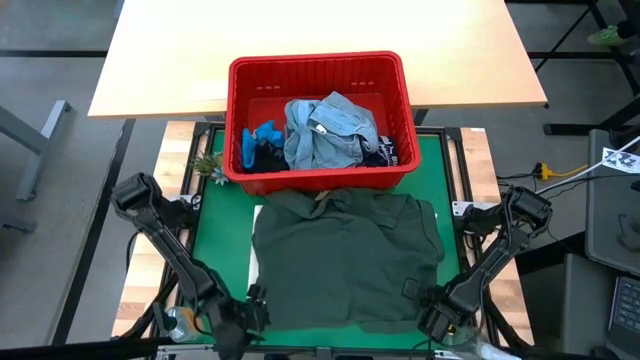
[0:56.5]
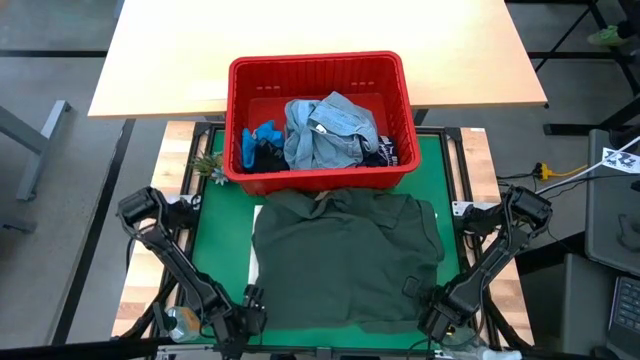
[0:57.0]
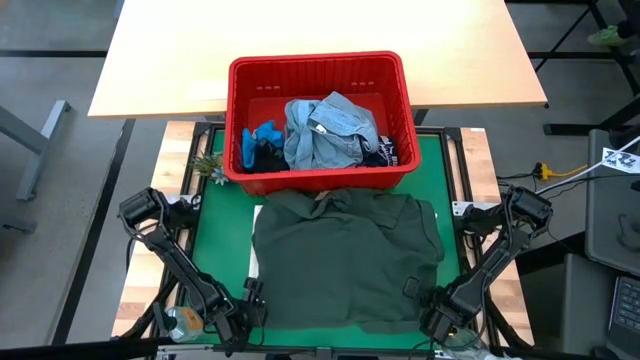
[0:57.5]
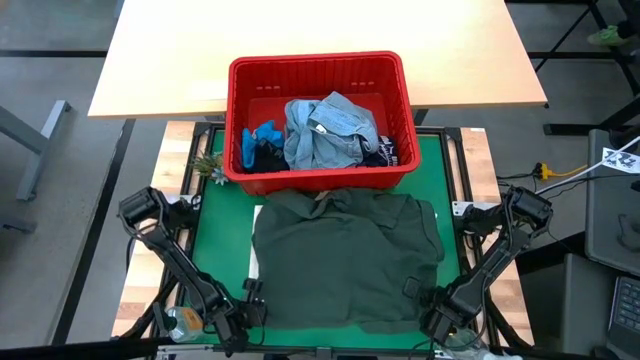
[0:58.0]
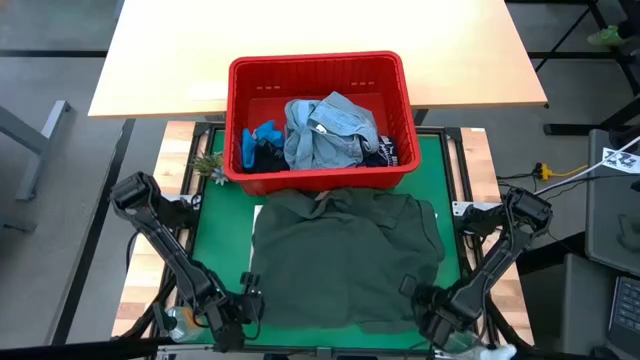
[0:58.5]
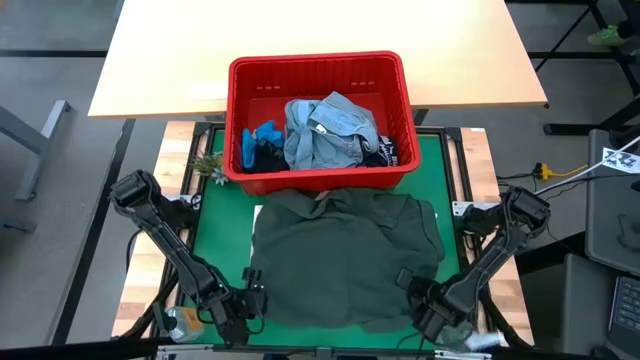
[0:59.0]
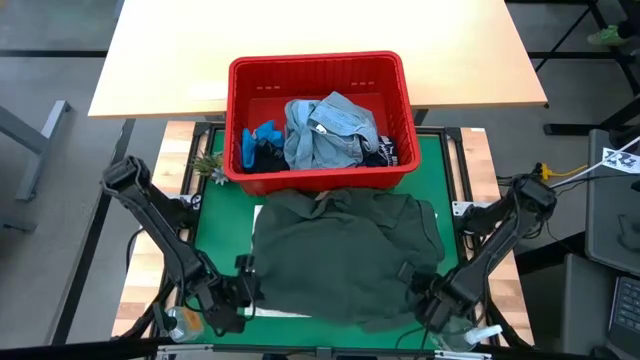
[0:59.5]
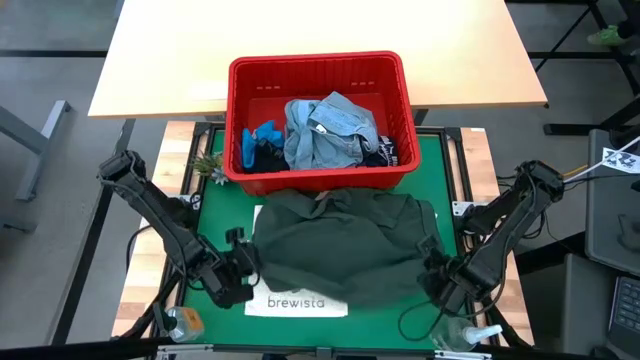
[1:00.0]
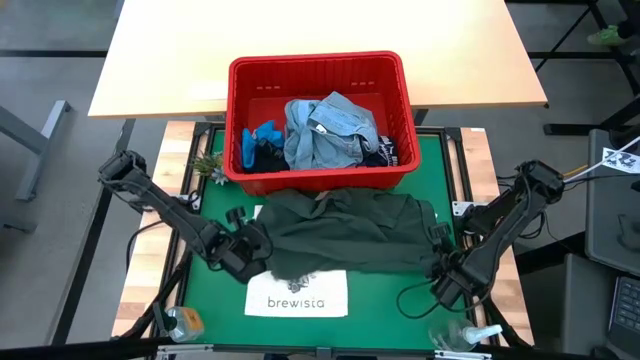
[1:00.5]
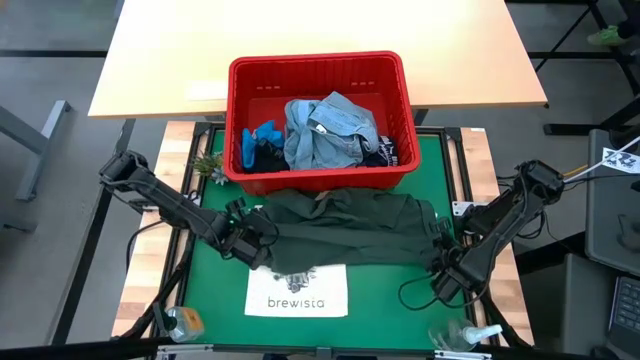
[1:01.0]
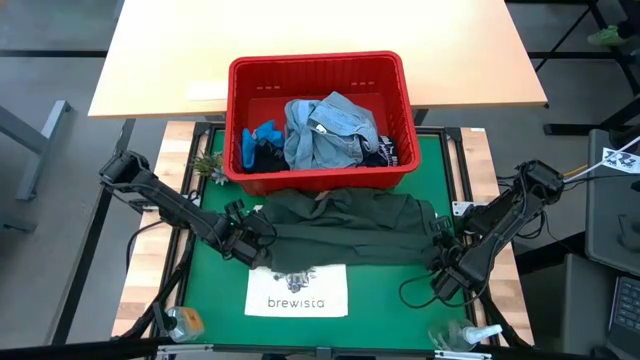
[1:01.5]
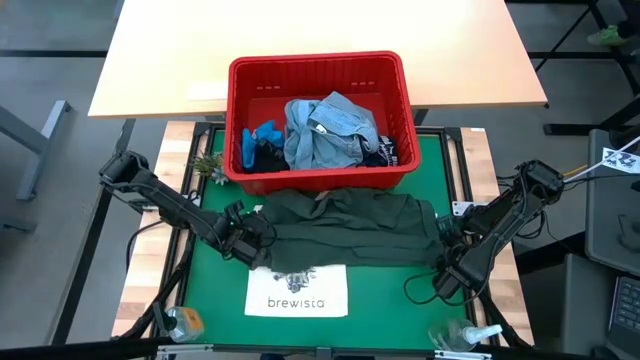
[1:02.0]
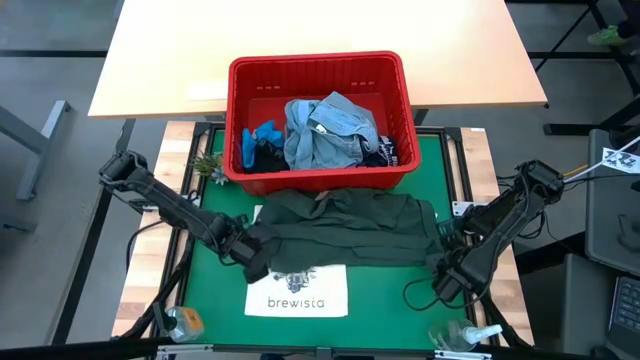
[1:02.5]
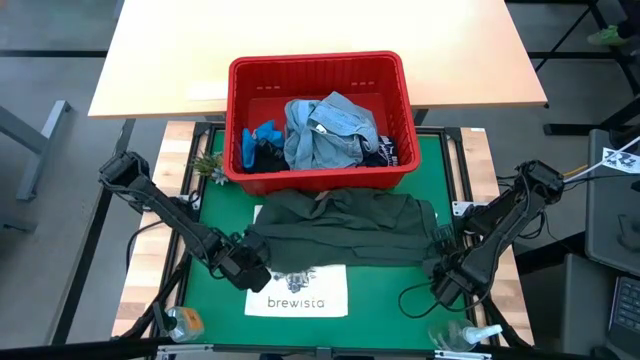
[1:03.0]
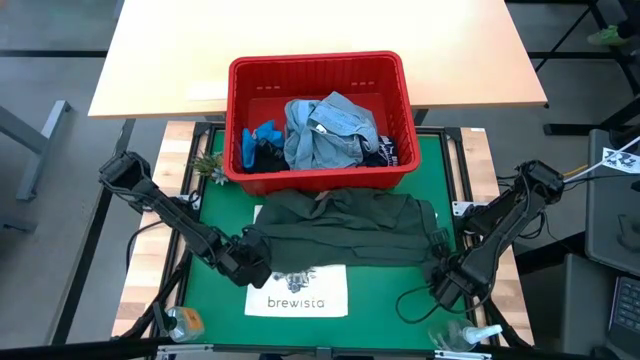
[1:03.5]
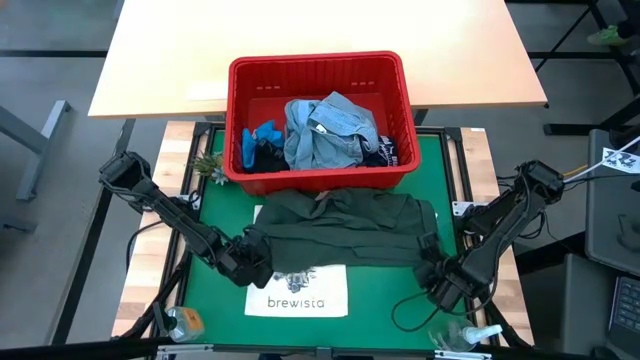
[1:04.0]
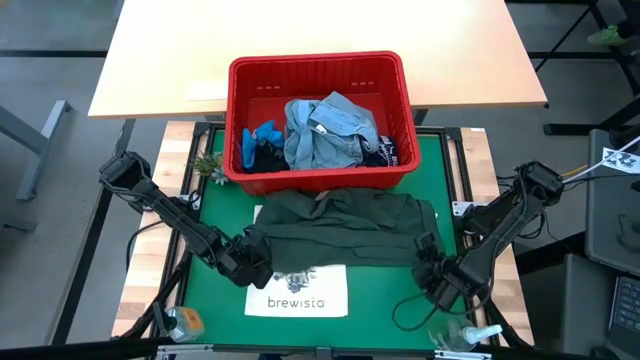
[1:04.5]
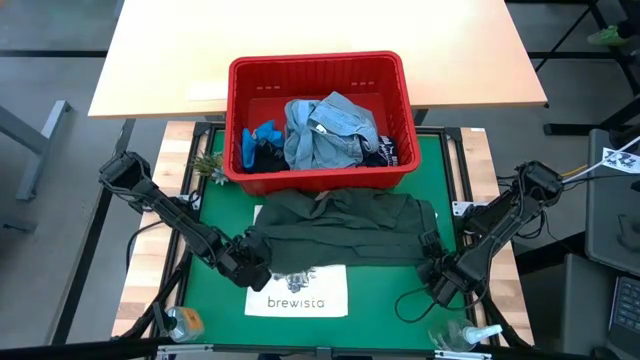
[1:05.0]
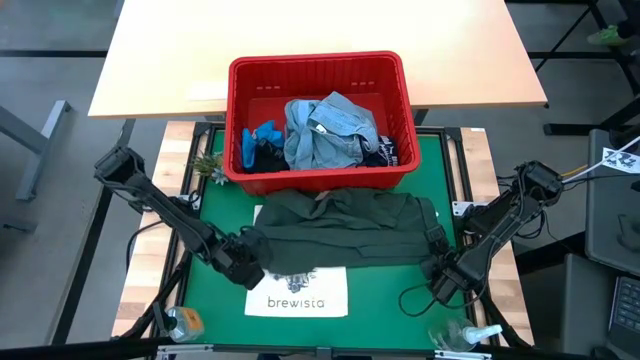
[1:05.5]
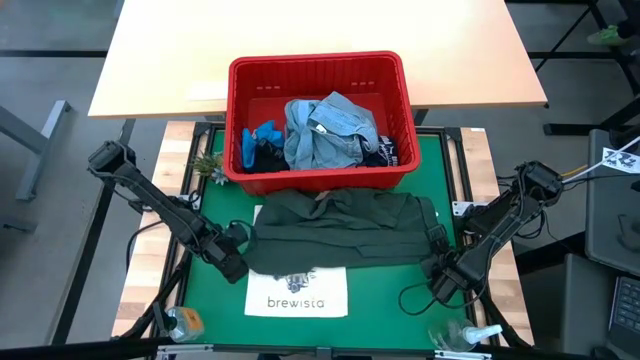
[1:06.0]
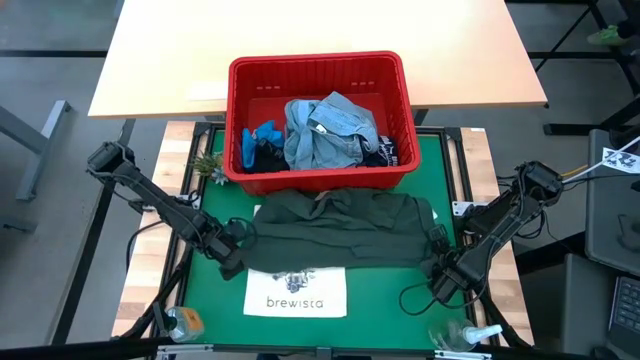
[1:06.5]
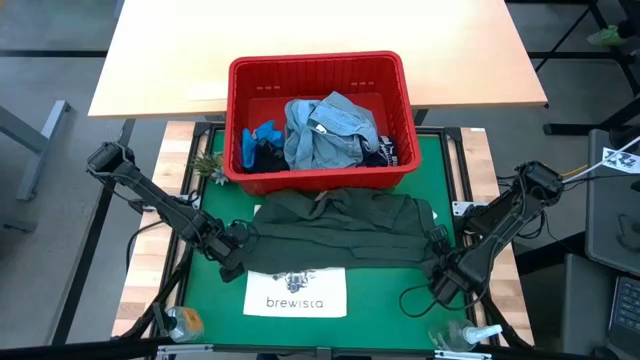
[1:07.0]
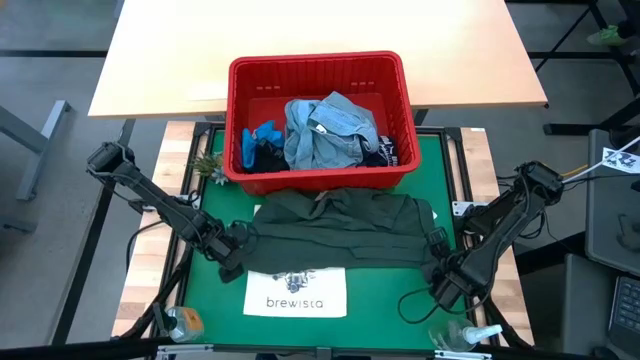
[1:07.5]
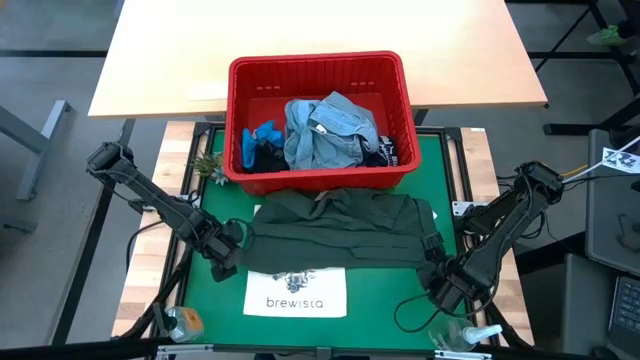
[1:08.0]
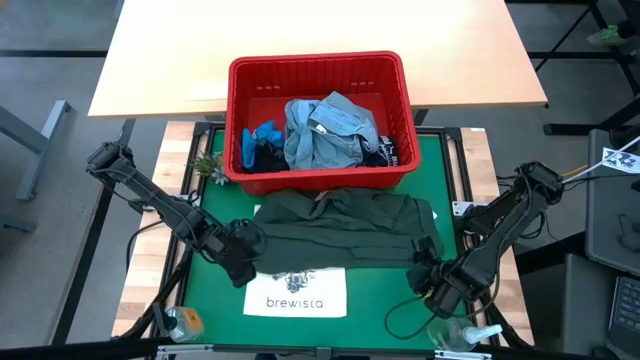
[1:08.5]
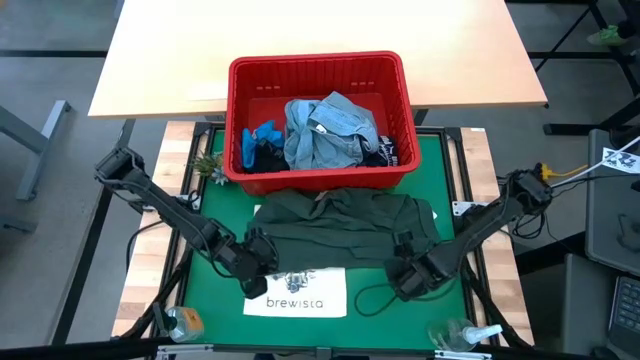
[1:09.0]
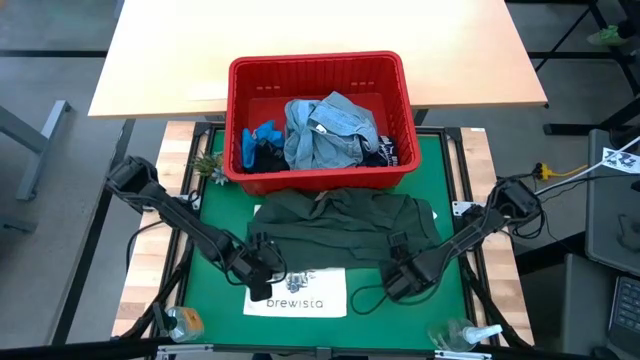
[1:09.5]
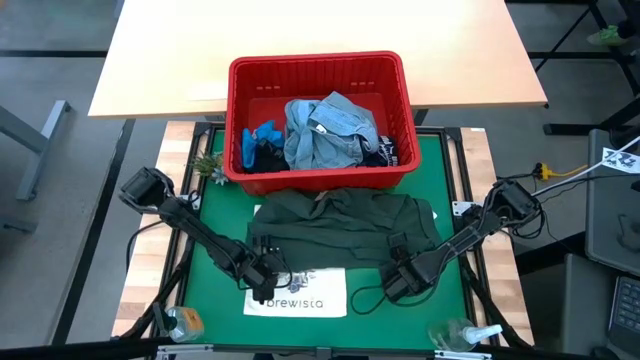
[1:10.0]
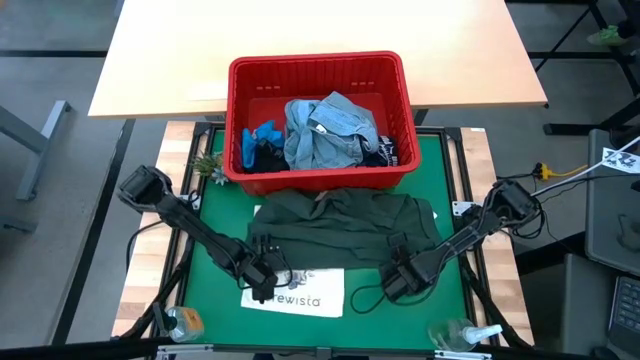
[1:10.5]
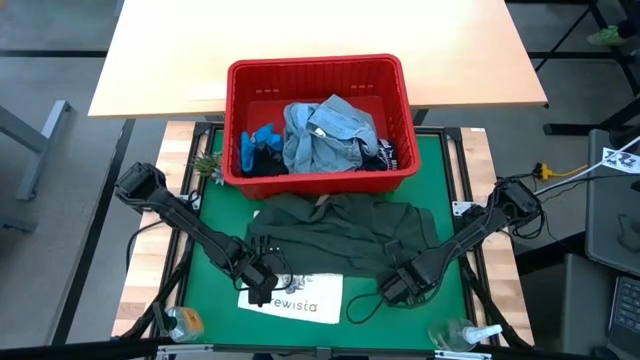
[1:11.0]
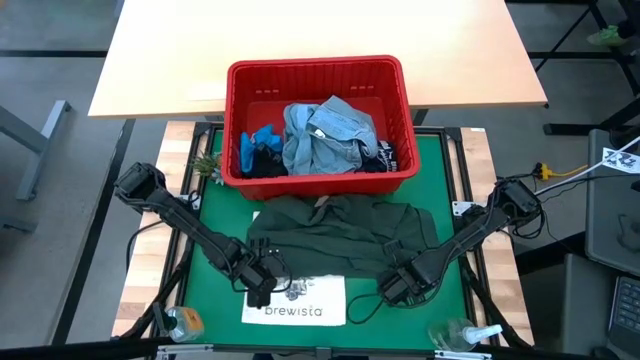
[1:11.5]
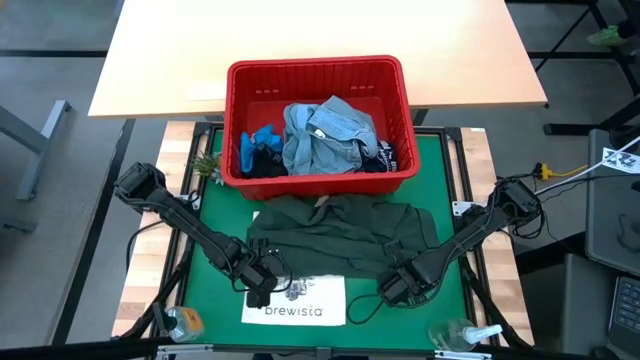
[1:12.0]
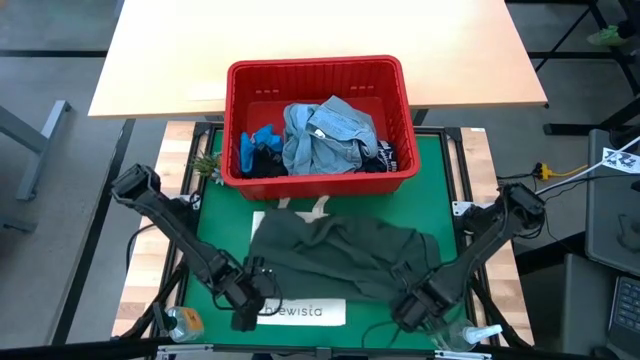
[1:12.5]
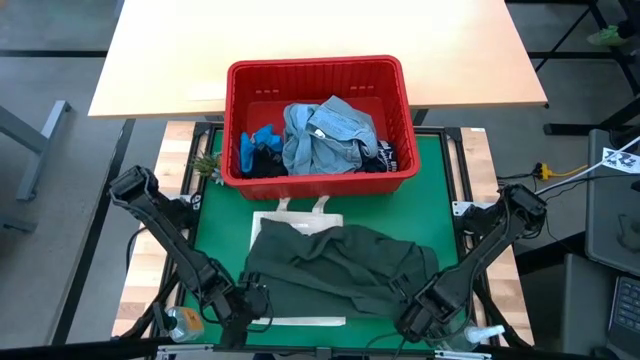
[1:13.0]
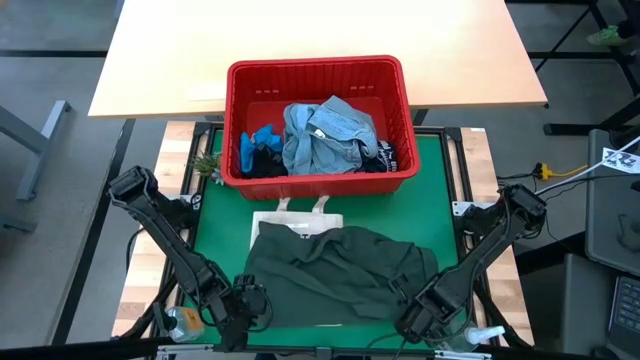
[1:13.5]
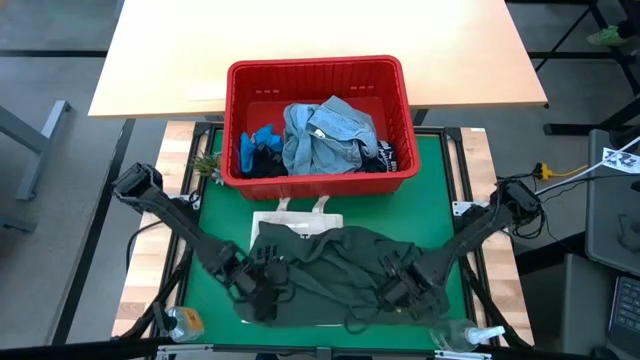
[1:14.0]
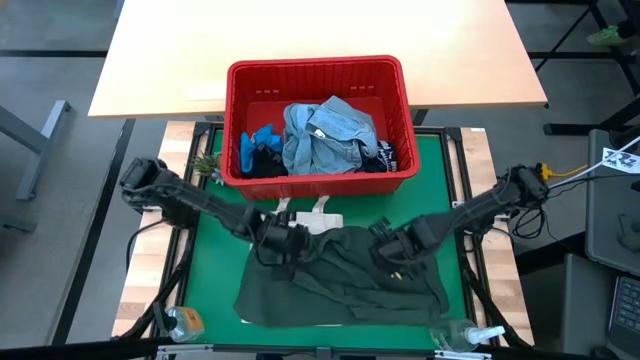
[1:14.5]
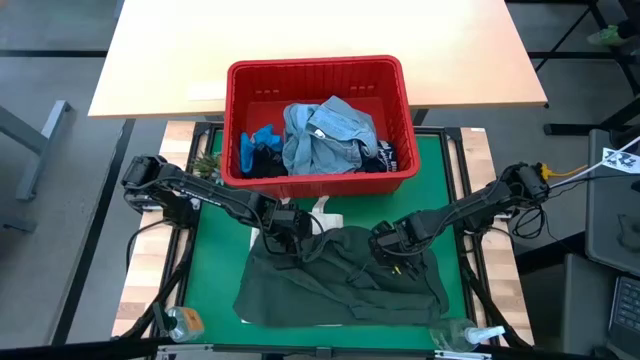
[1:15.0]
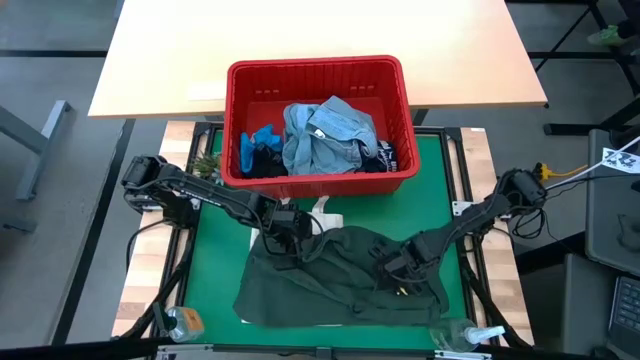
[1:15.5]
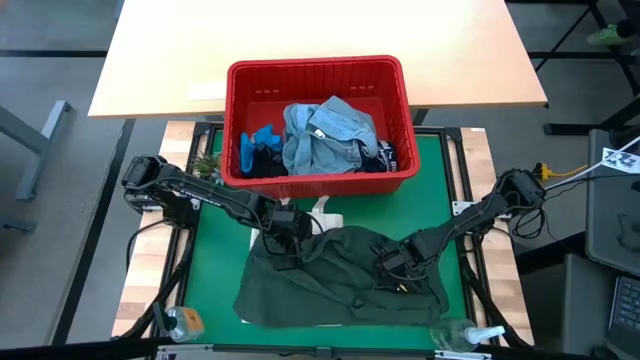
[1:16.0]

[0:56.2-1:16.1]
Task: Fold Laundry from Bin
Fold the green t-shirt
